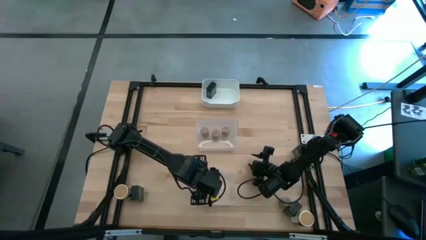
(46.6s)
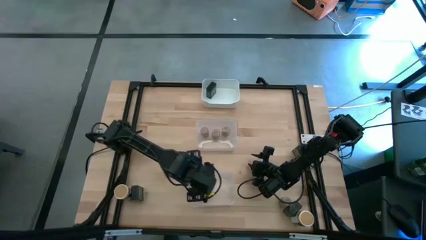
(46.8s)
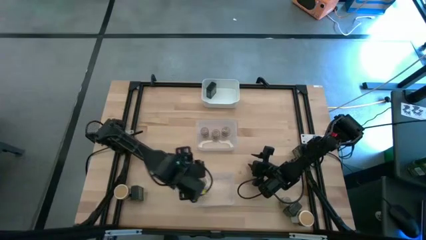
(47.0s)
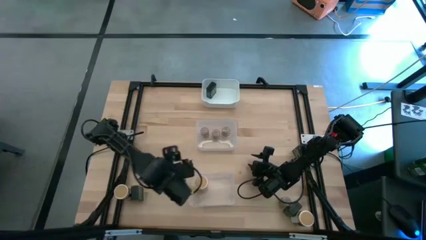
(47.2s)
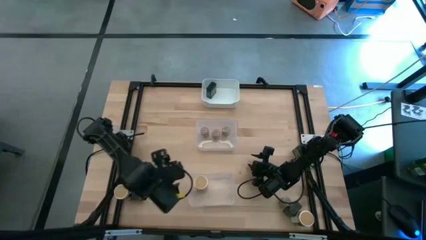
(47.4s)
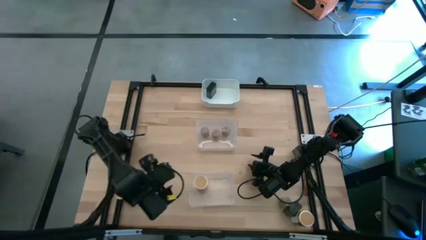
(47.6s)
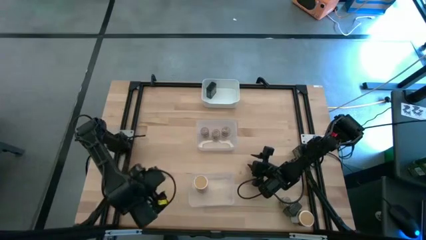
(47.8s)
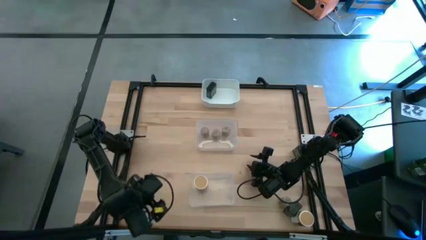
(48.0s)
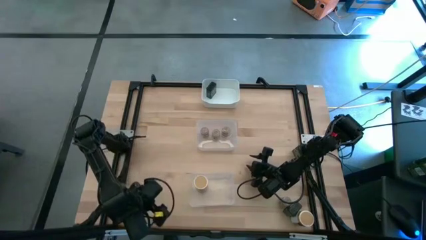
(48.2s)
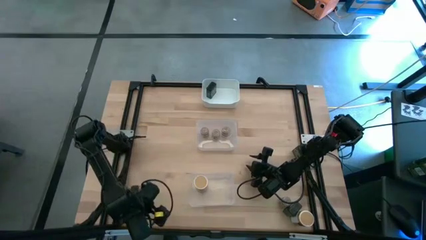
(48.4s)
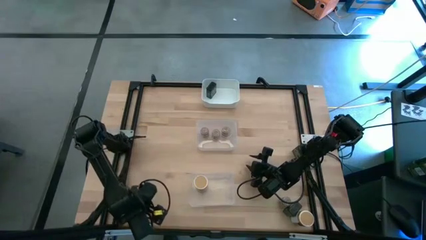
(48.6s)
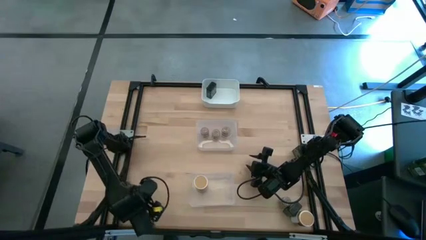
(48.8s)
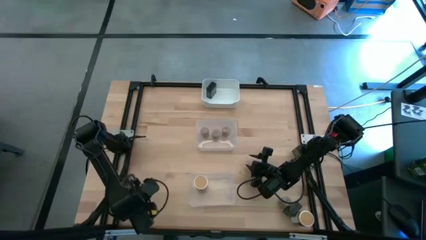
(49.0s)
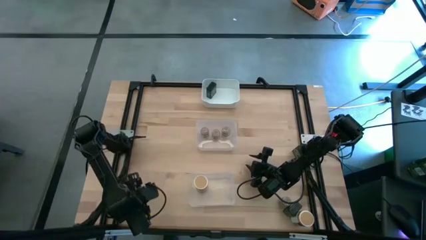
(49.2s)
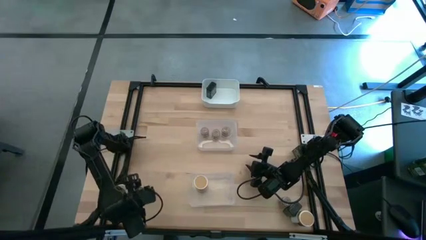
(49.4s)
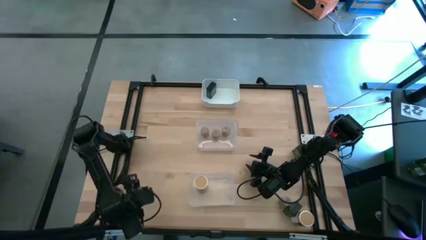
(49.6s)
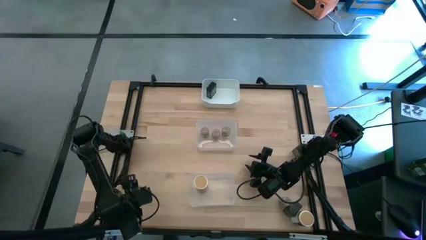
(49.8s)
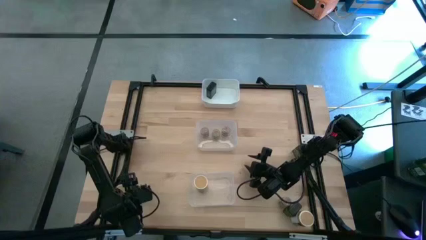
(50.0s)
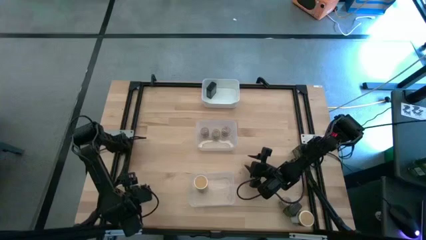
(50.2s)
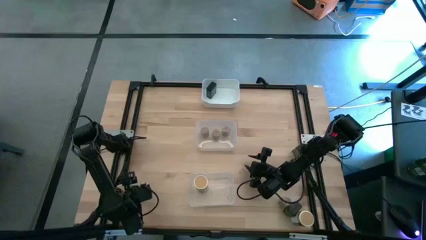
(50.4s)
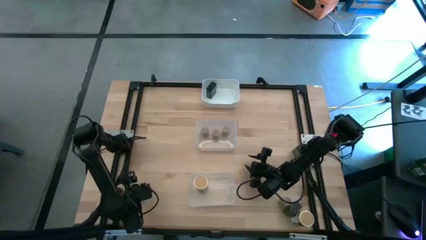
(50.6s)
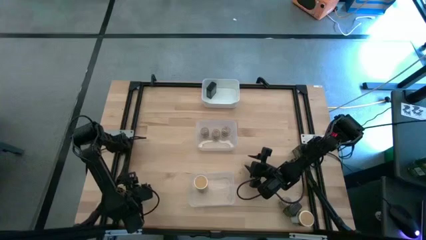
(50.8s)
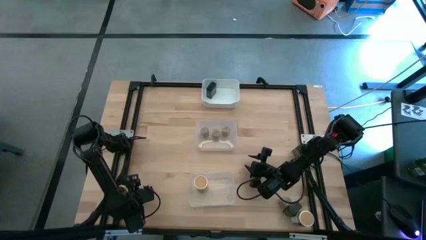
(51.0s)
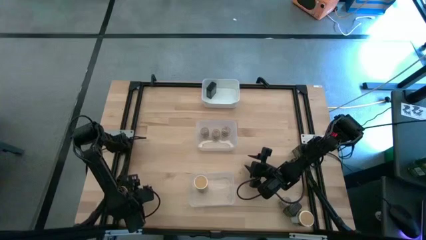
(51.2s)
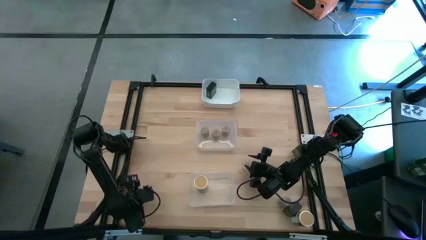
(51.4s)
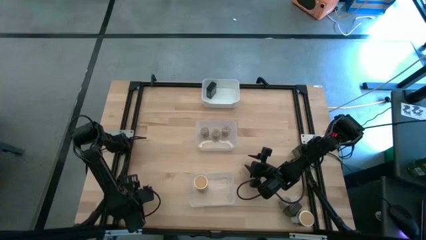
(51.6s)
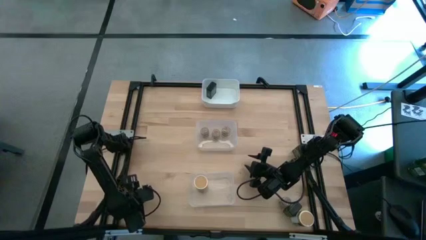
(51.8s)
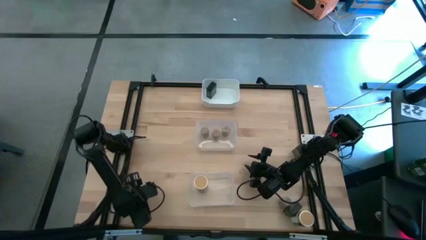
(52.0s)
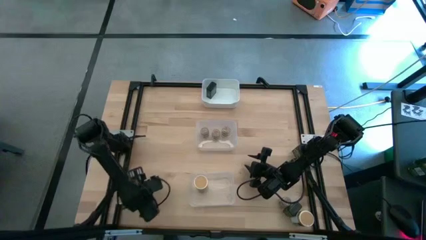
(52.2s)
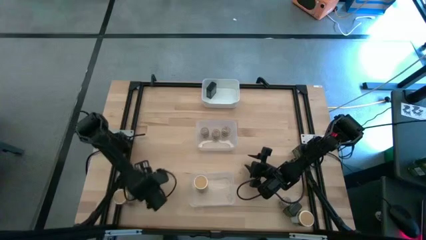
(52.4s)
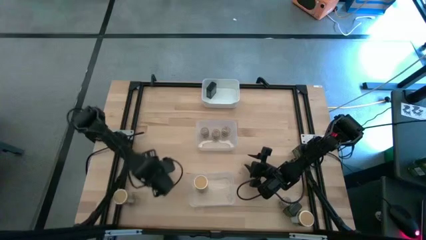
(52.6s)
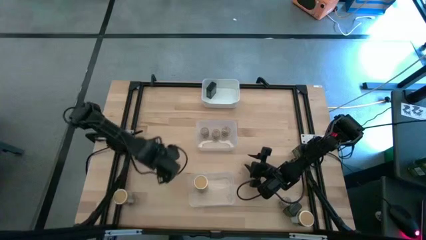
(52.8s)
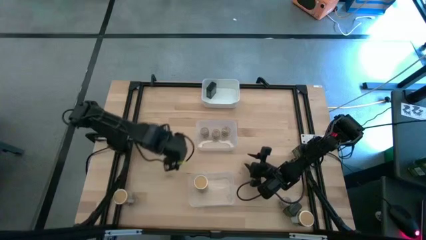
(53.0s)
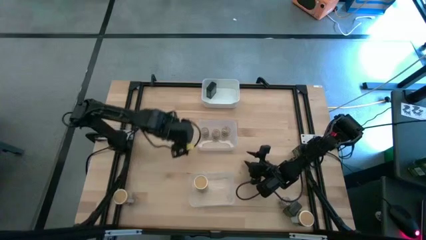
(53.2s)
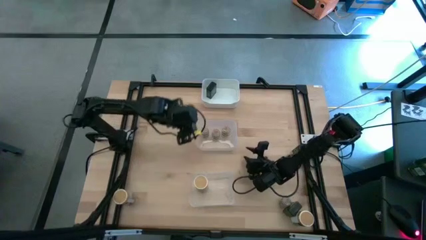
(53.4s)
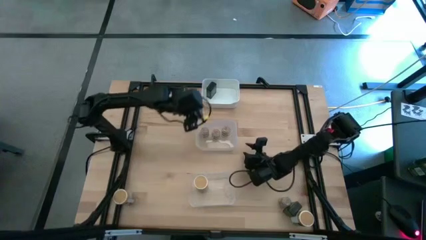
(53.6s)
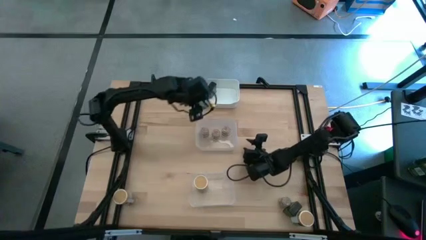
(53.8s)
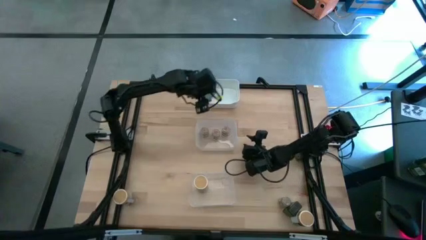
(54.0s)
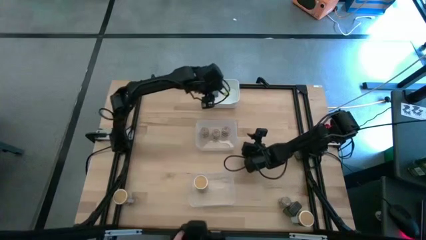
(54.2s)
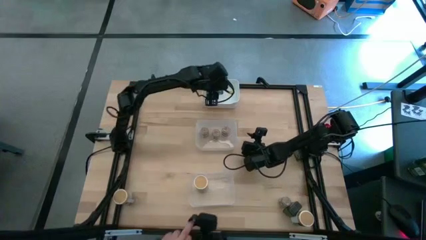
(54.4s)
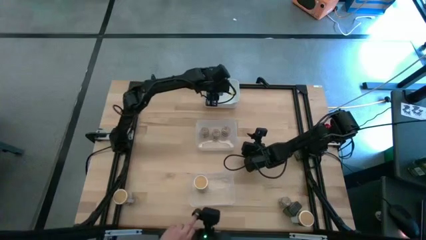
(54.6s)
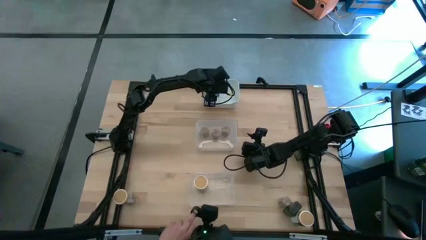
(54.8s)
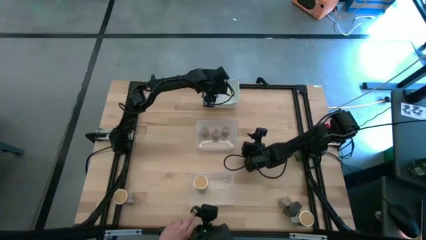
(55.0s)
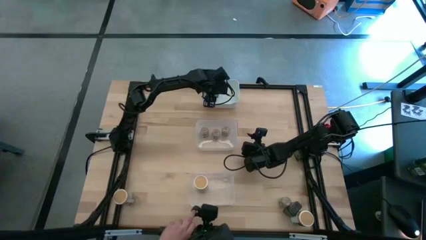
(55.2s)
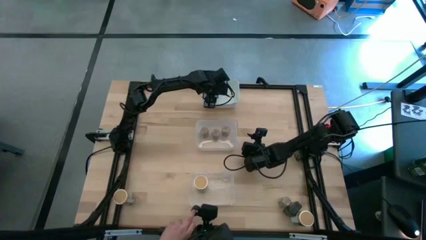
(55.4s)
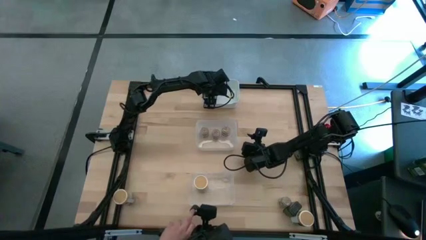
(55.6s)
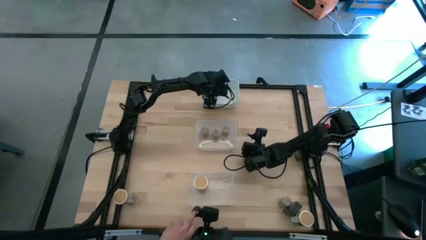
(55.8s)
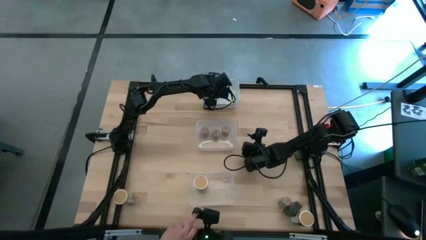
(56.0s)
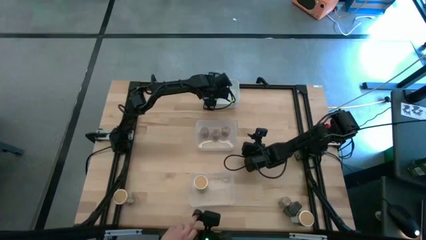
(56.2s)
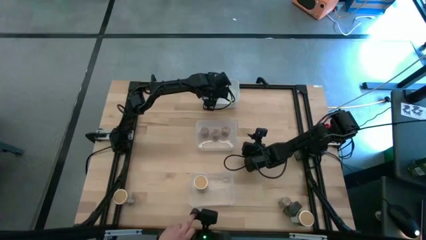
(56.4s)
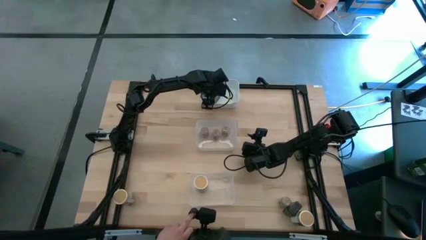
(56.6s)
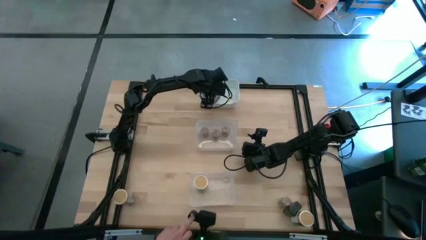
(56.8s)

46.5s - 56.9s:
Task: Sort spices by type
Put the left black seasoning can into the white bin

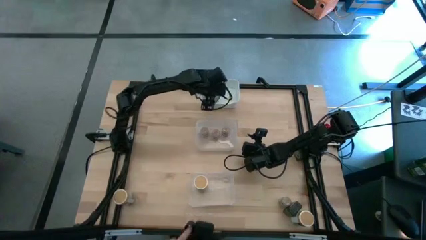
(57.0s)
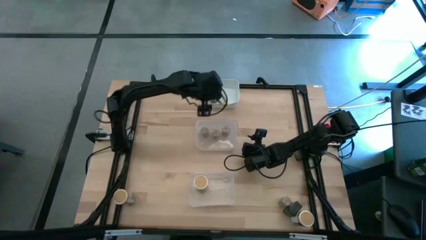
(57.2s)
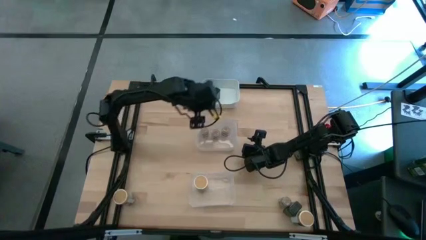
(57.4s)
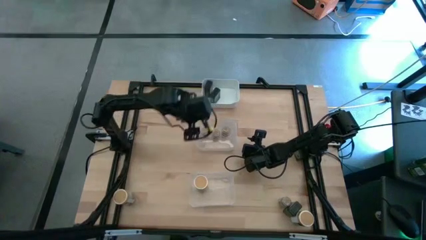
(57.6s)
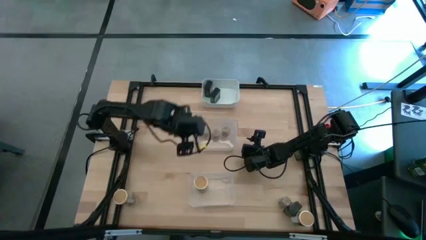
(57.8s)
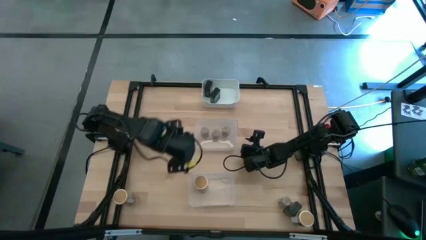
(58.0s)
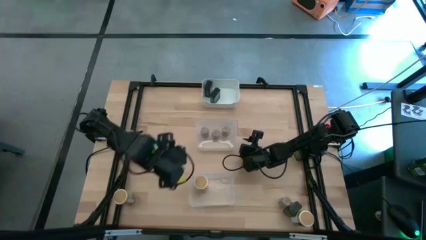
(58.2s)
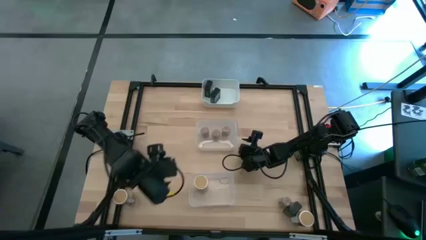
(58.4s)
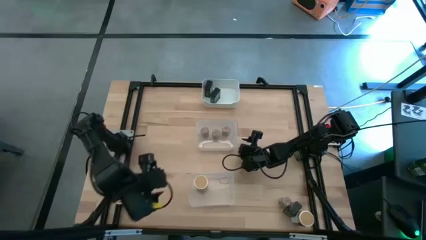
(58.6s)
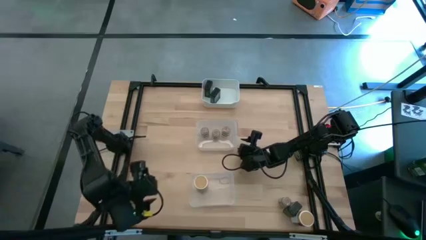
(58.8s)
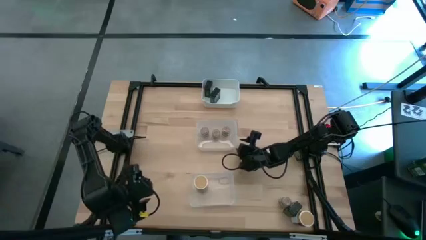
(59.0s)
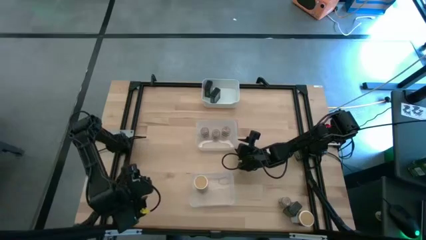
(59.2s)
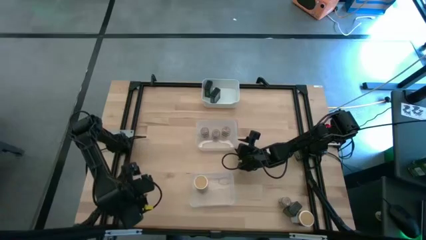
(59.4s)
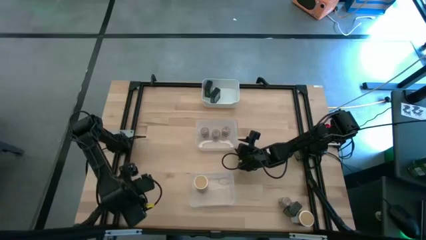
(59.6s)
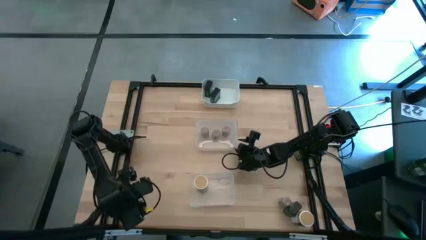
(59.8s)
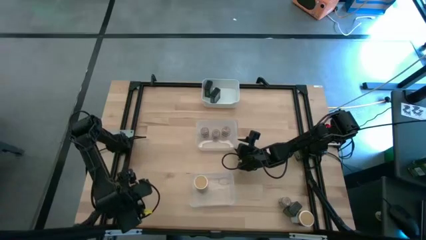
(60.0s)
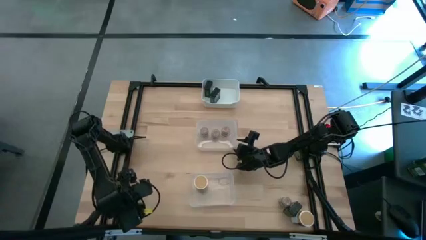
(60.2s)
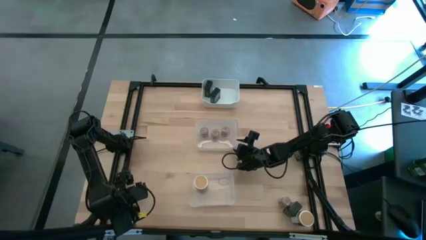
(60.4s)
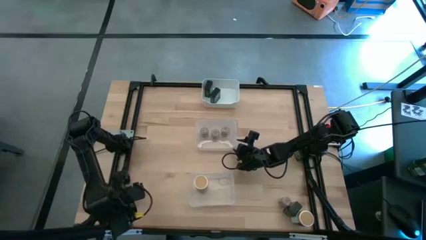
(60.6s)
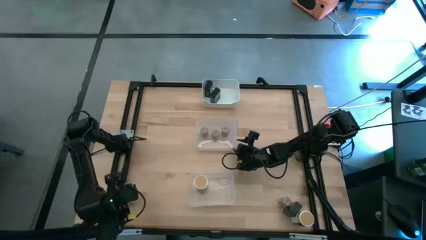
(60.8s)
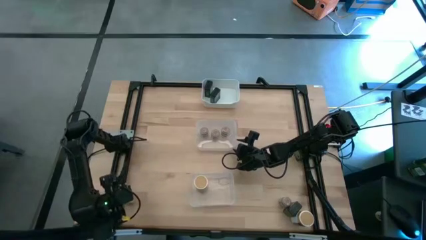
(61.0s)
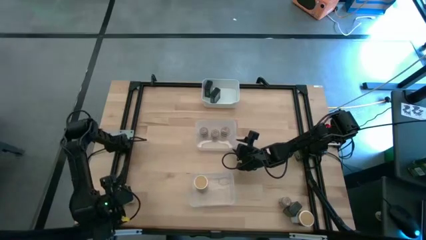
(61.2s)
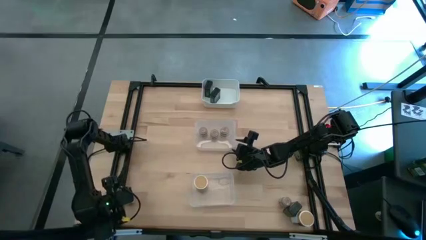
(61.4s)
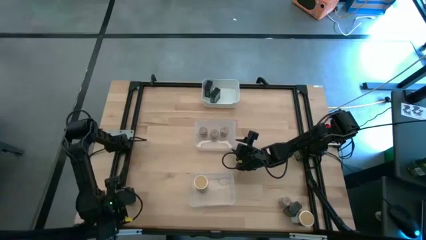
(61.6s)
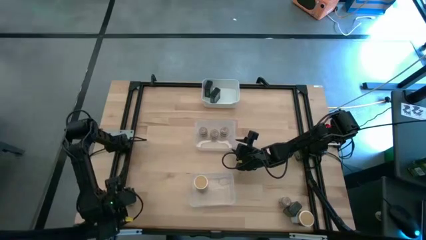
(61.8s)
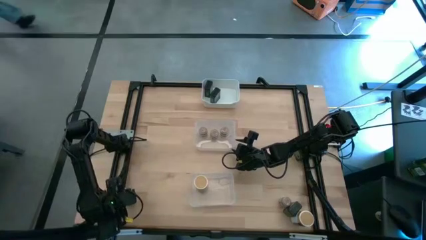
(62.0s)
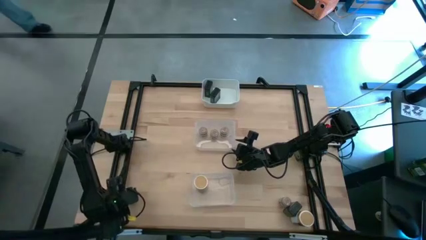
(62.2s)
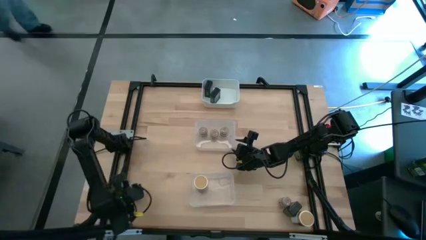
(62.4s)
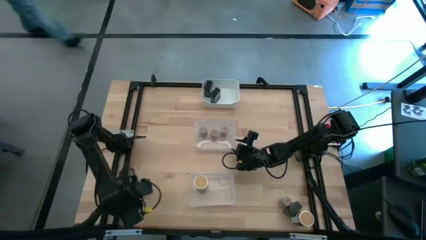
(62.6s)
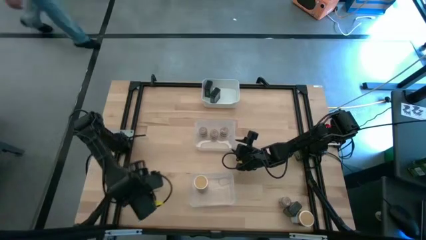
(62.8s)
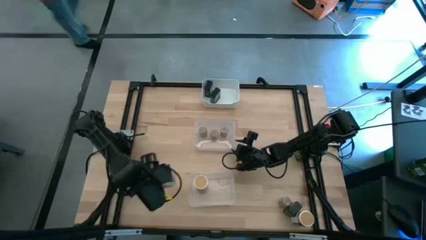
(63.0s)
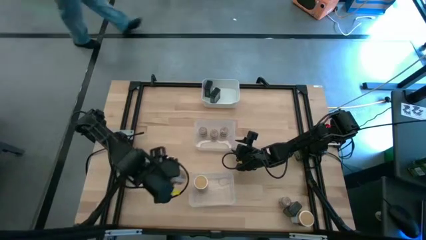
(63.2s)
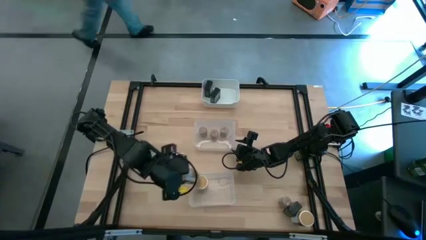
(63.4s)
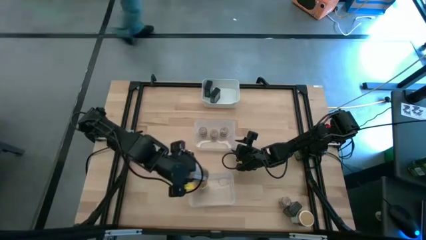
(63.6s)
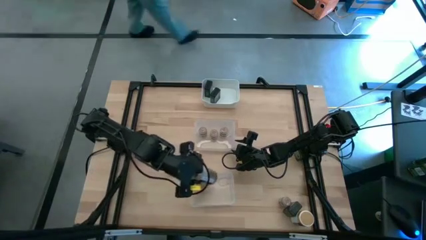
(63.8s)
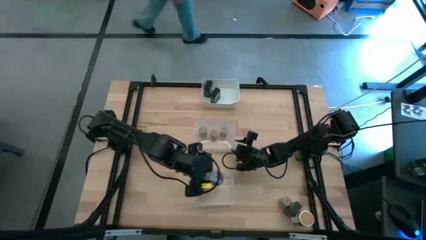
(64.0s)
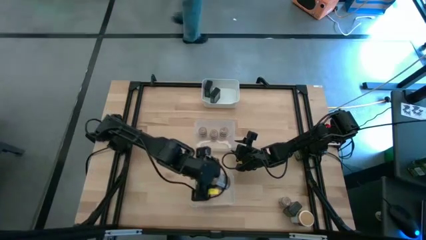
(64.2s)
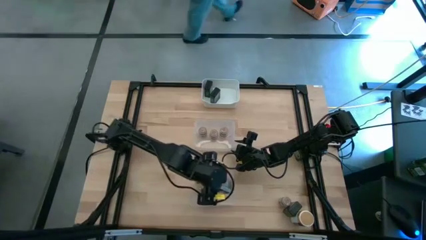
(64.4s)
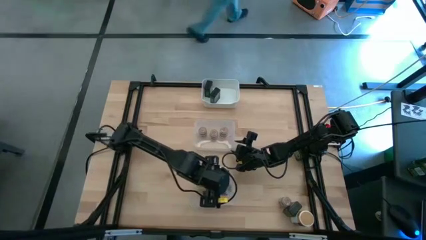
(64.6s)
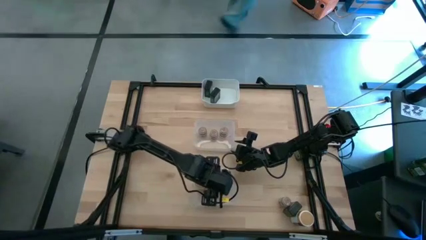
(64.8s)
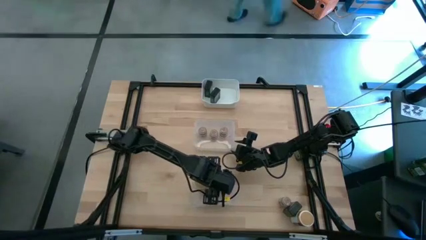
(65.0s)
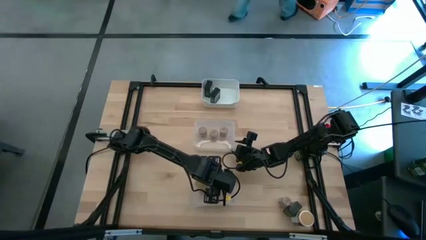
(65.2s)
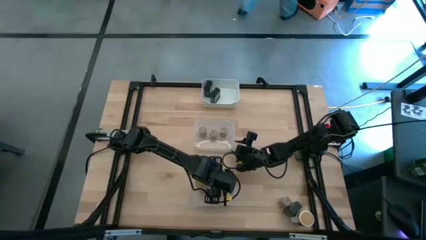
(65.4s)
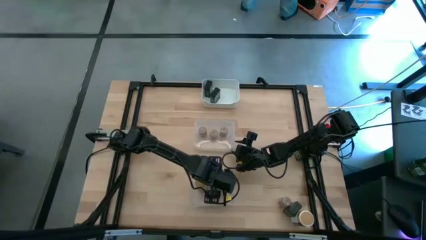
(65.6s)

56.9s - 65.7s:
Put the left gold seasoning bottle into the bottom transparent bin
